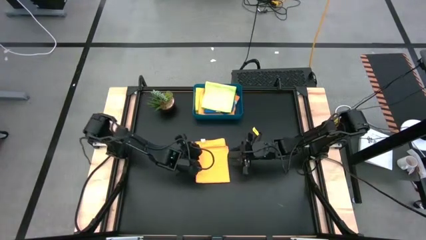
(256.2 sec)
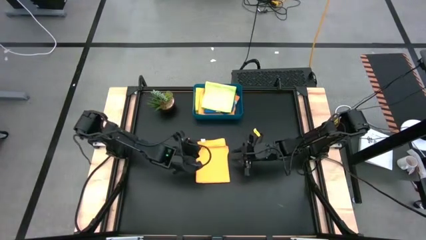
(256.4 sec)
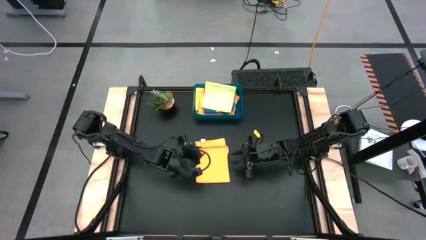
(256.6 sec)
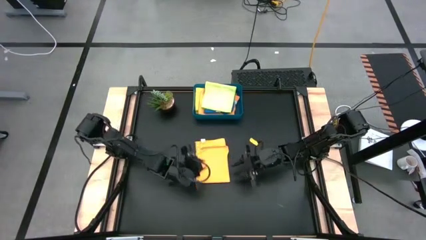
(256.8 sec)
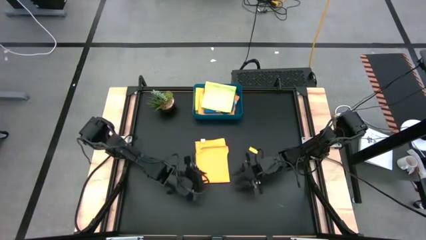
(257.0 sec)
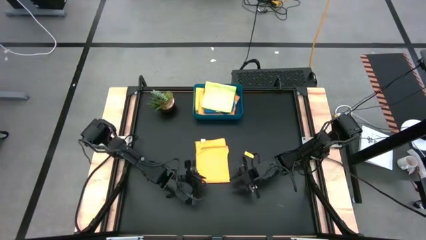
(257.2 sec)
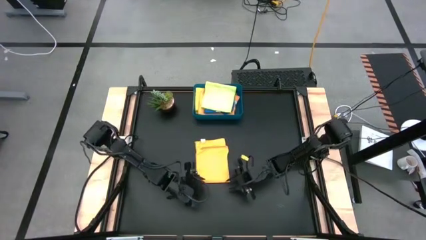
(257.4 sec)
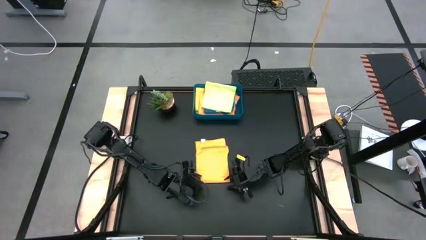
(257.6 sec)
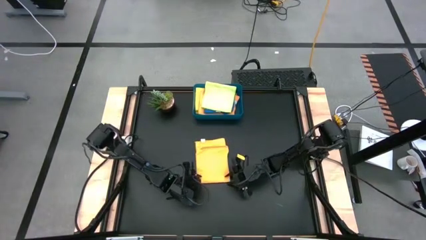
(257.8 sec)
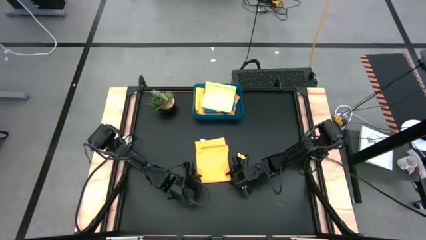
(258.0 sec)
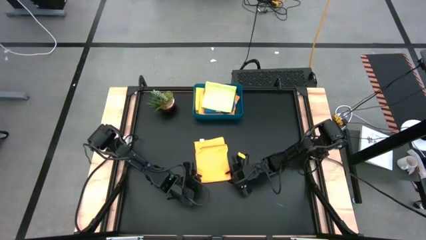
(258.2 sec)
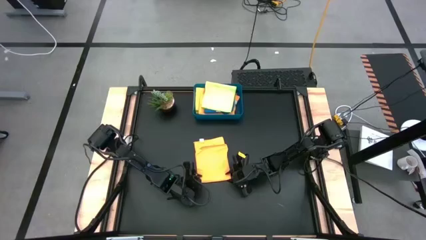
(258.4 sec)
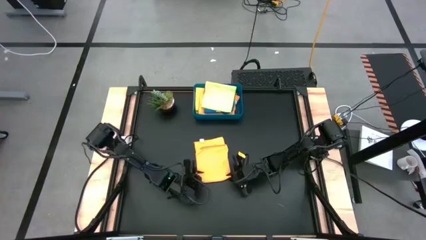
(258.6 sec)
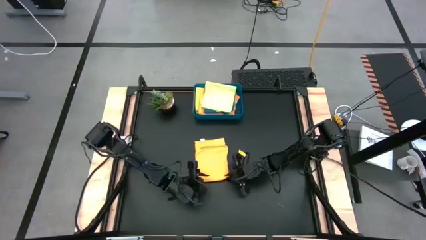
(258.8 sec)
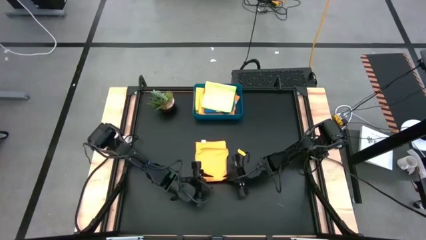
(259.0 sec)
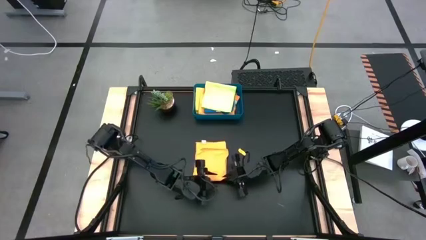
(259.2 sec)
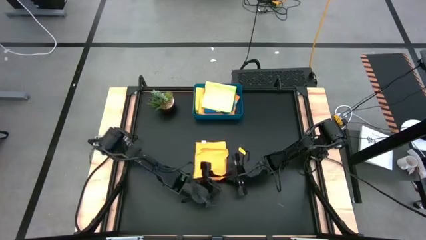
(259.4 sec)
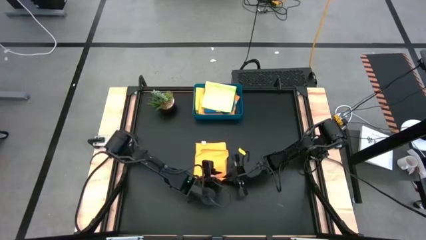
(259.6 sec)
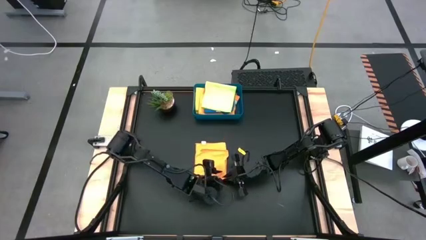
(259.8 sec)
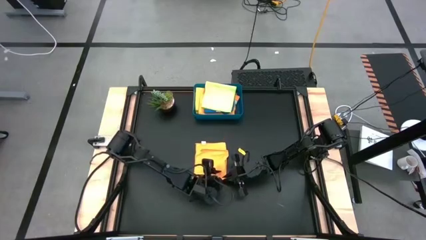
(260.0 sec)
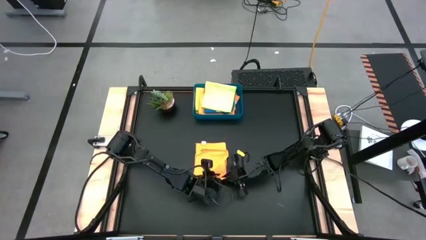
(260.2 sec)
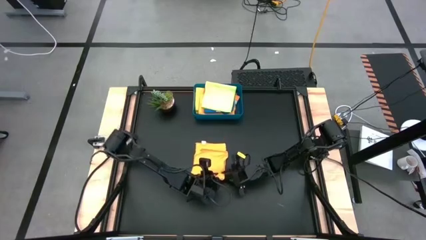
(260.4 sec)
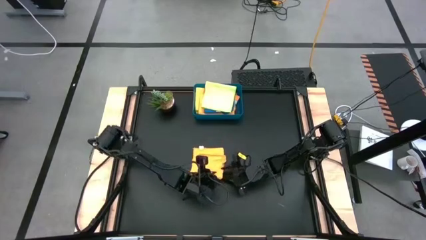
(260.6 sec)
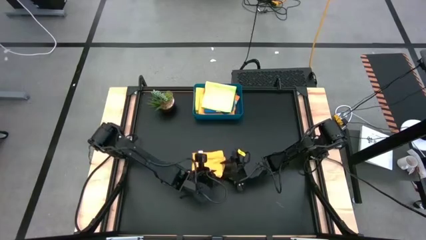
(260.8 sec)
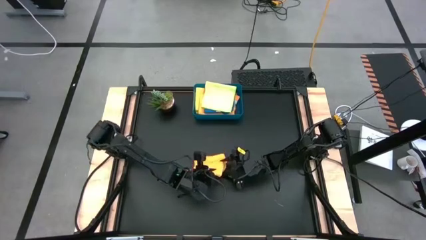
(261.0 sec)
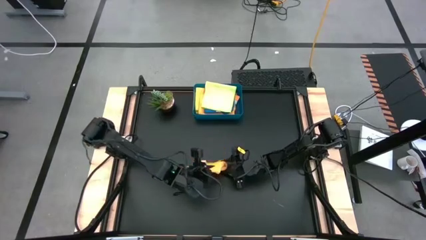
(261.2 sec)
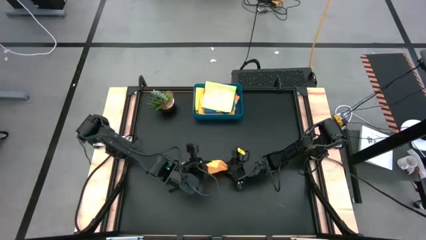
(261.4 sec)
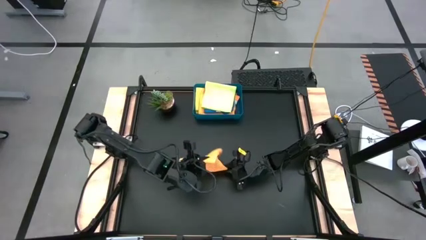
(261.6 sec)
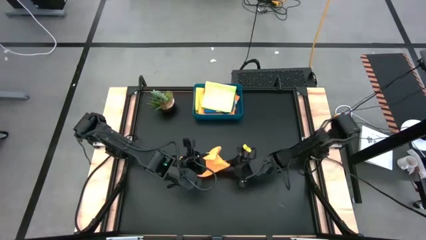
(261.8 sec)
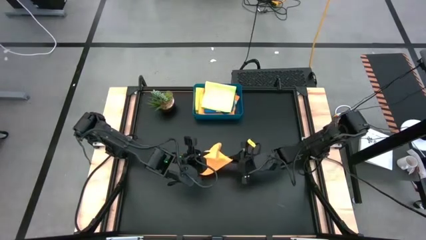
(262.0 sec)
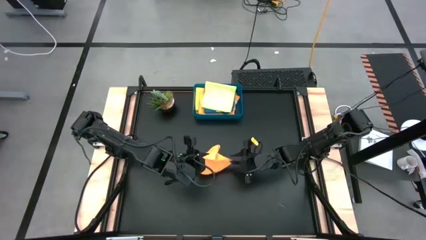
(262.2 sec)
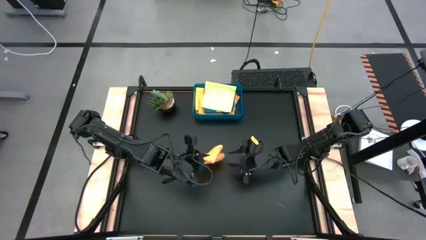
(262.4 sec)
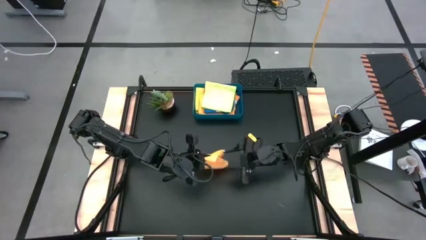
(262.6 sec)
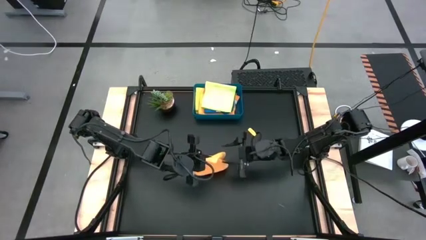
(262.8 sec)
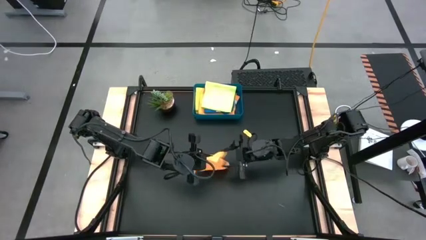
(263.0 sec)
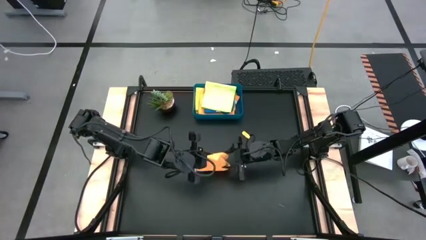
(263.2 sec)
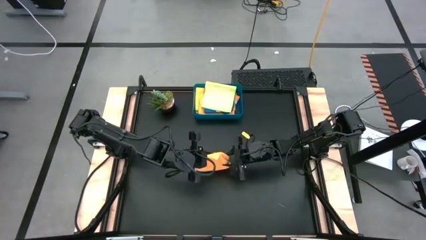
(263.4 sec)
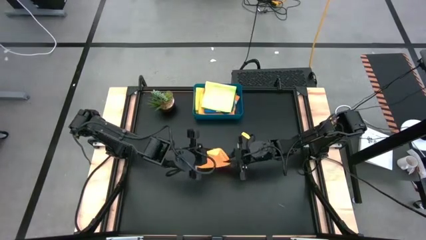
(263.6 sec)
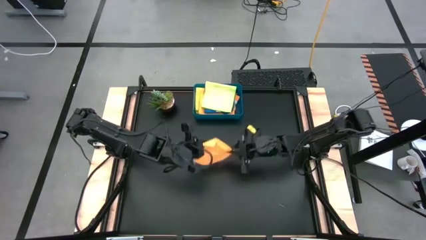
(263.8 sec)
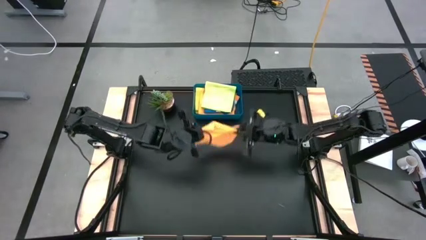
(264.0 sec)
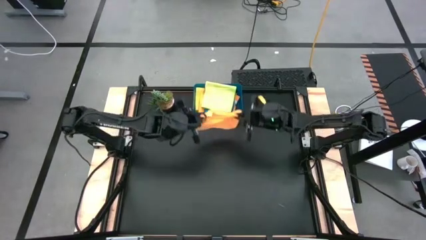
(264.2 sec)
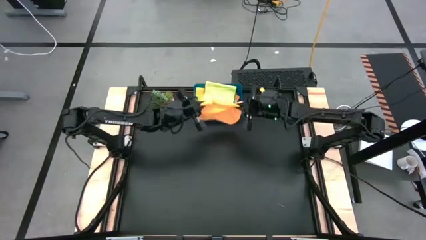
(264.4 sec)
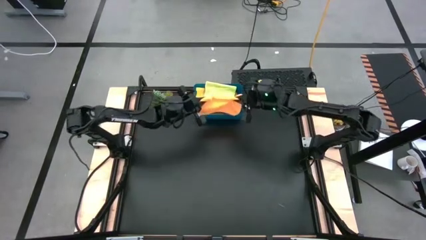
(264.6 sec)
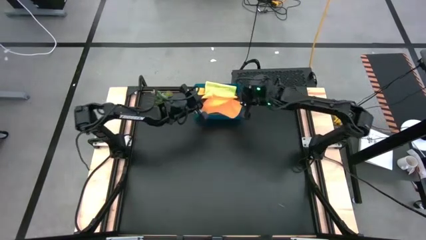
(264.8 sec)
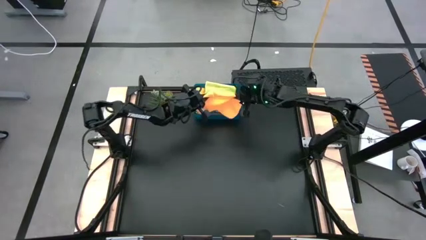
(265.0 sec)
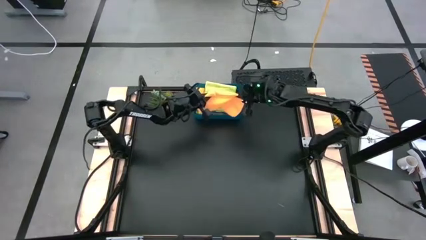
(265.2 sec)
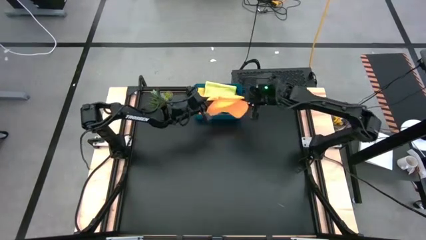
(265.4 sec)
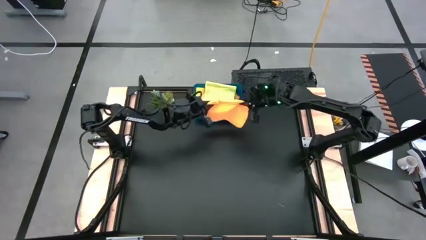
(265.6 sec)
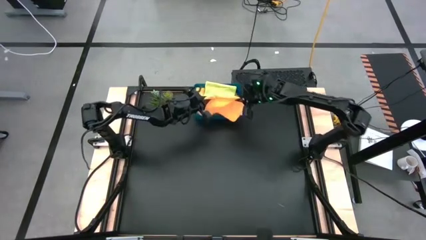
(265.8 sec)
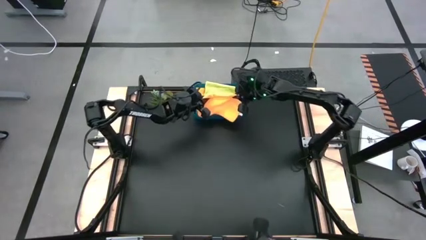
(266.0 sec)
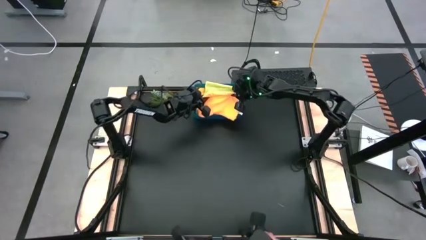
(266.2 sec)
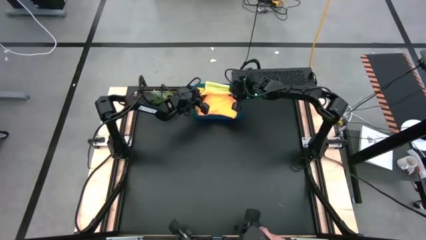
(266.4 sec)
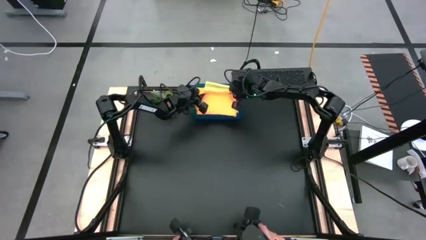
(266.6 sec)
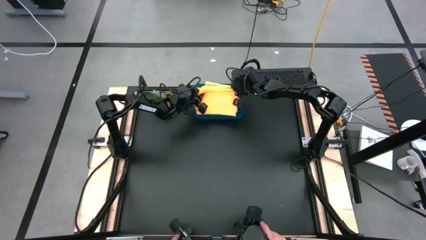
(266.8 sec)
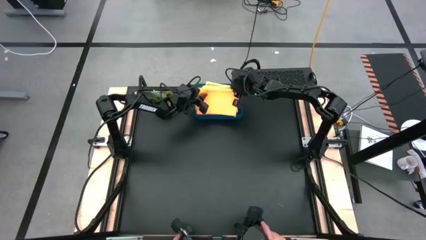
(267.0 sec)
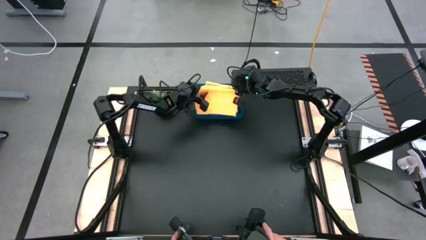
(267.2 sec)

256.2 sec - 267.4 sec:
Task: Fold microfiber towels
Put the folded orange microfiber cloth into the blue bin

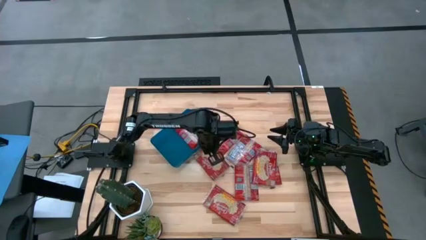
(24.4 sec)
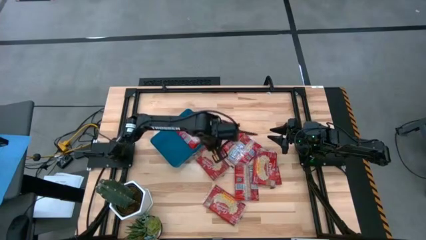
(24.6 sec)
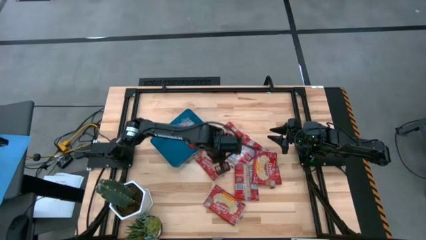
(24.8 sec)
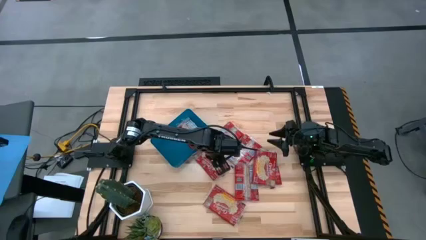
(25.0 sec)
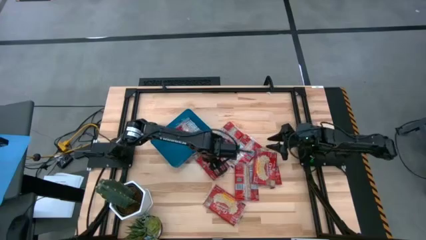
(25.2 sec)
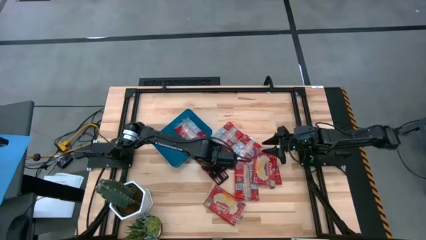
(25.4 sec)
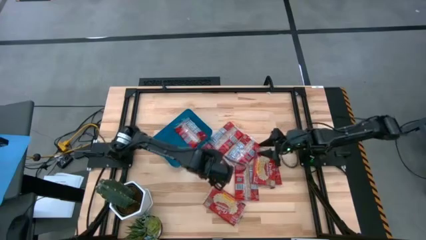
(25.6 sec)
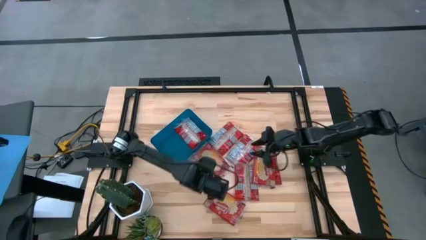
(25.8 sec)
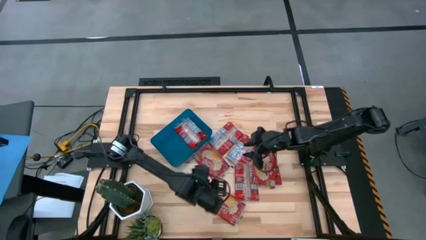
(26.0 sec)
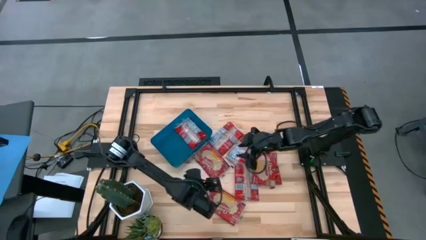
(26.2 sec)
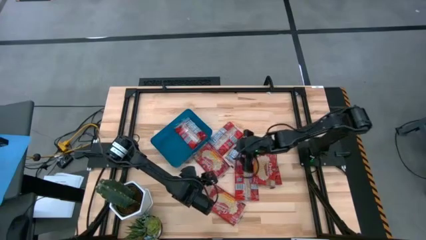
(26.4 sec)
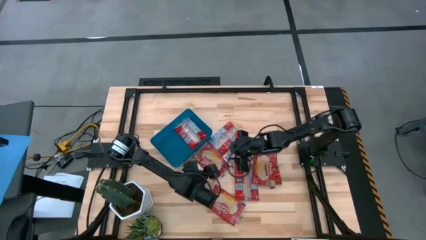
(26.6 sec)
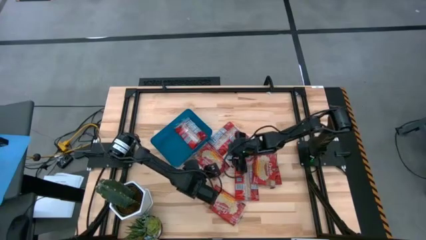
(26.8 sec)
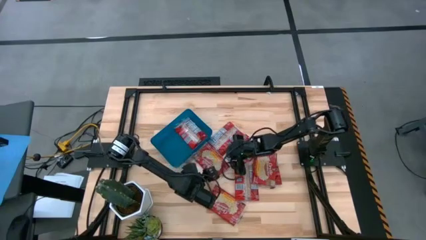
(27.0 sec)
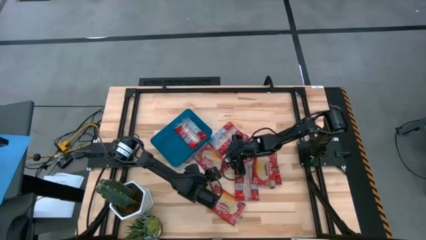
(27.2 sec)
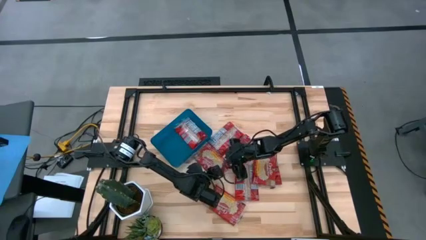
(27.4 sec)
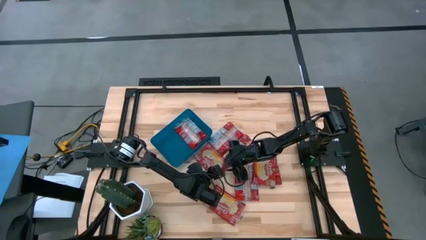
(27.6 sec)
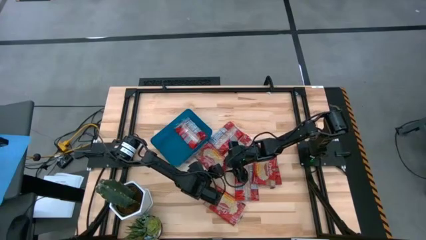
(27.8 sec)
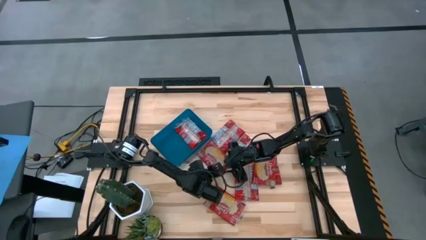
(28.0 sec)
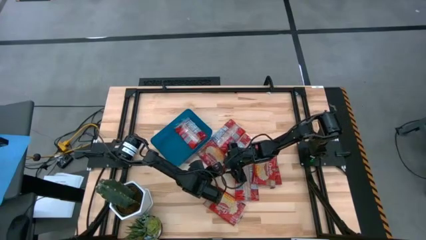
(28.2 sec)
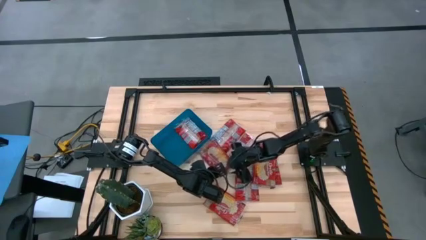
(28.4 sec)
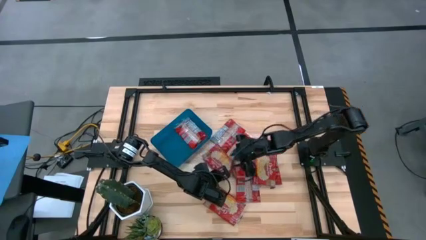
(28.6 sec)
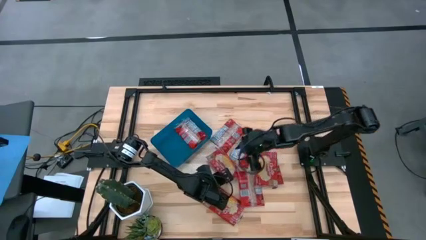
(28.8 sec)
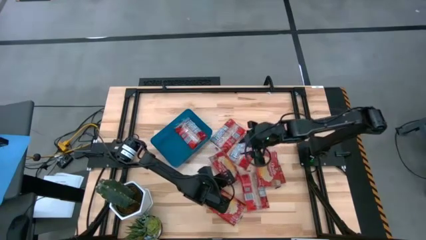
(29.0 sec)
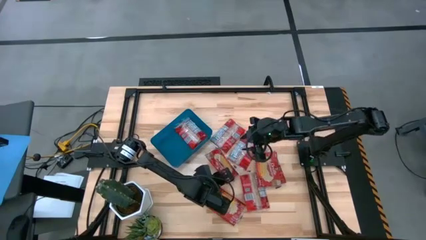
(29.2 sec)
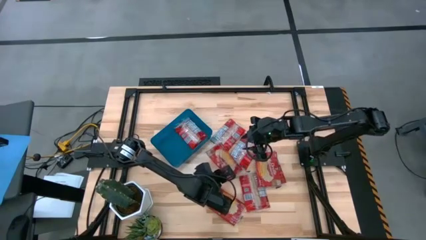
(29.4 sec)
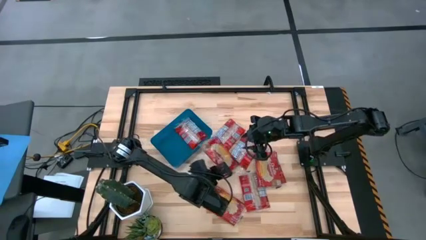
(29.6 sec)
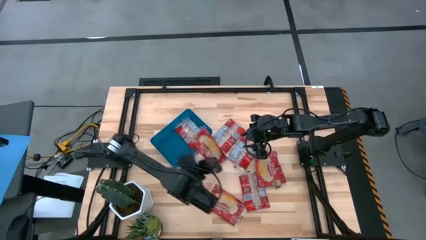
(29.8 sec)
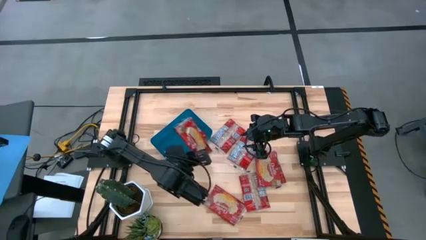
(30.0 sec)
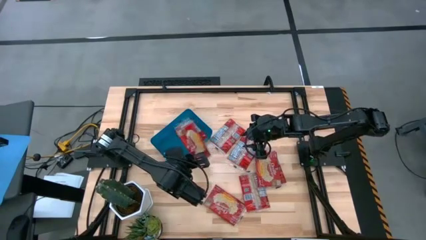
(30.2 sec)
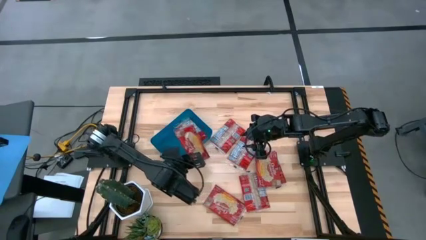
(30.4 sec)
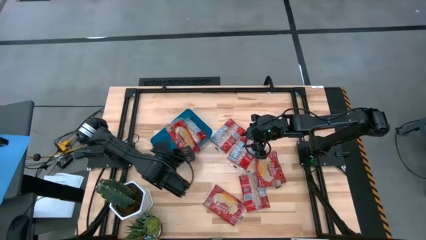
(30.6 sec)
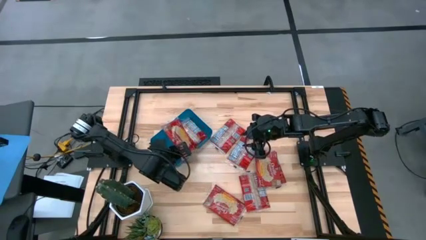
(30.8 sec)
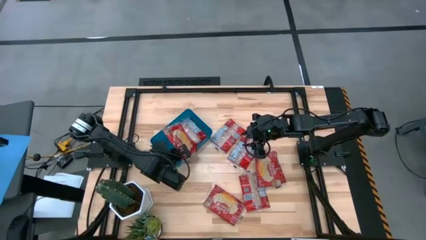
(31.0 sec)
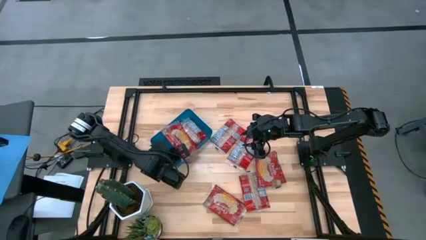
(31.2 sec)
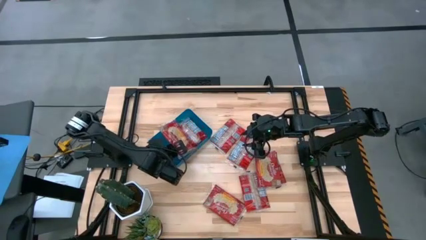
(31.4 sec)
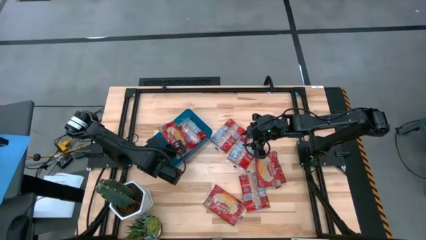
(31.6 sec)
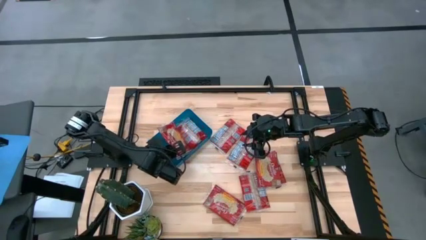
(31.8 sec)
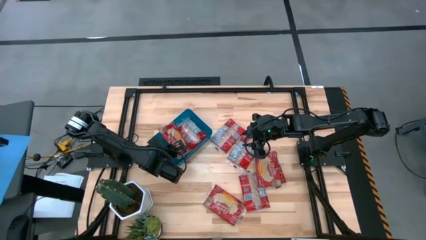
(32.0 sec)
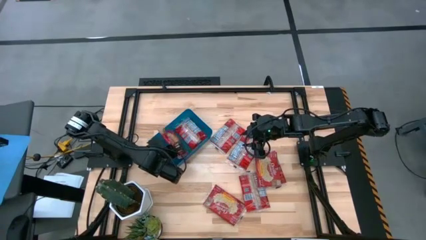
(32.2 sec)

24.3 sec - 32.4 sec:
Task: Sort popcorn bags into baskets
Put the red popcorn bag into the blue bin
